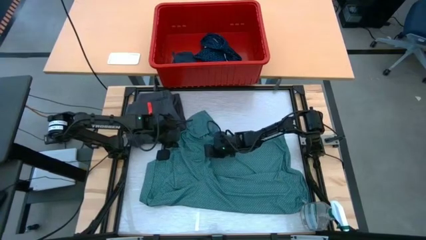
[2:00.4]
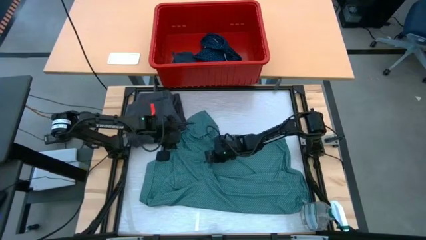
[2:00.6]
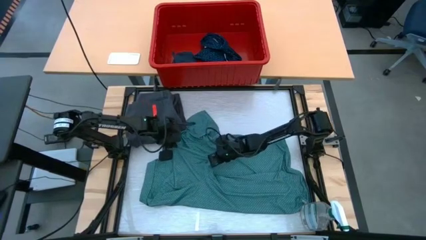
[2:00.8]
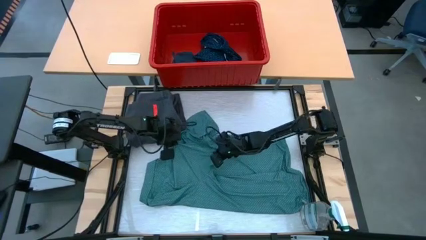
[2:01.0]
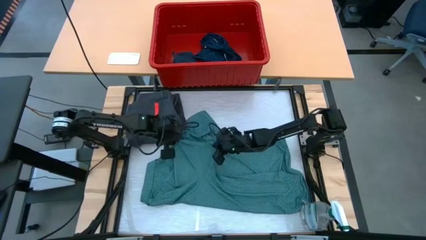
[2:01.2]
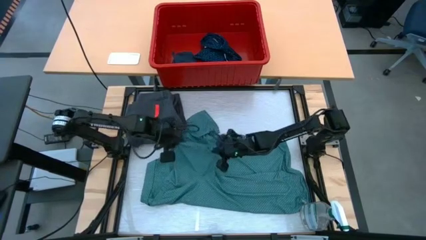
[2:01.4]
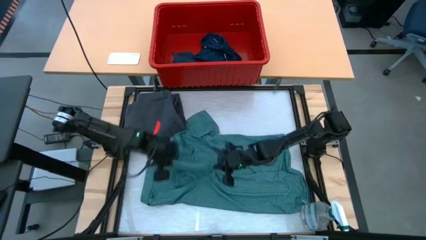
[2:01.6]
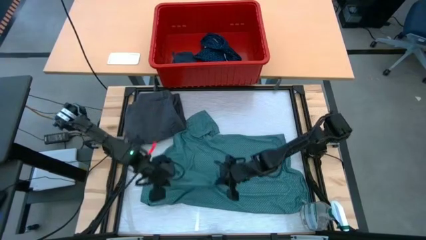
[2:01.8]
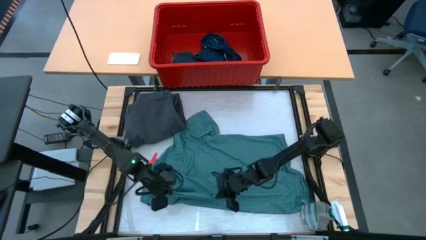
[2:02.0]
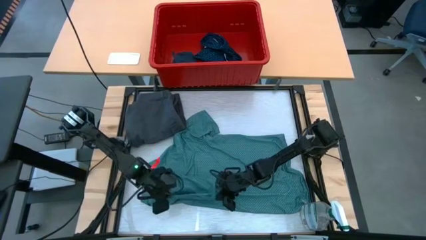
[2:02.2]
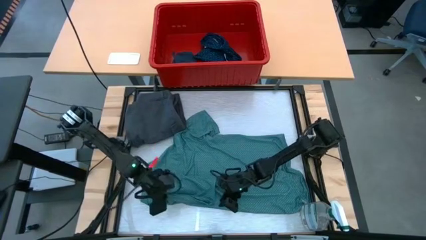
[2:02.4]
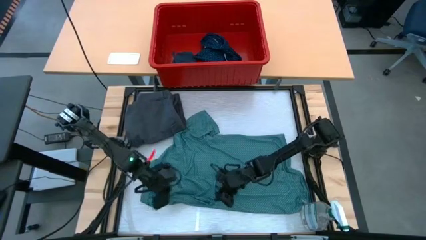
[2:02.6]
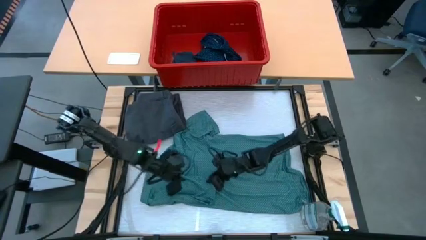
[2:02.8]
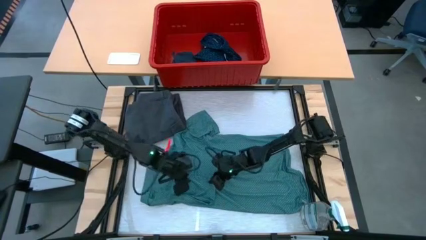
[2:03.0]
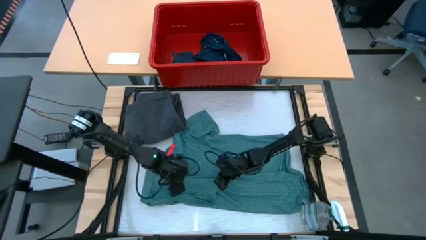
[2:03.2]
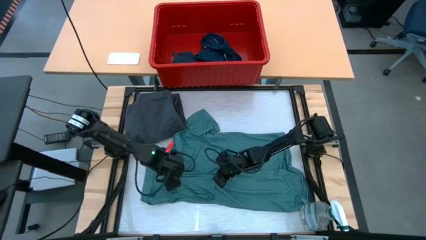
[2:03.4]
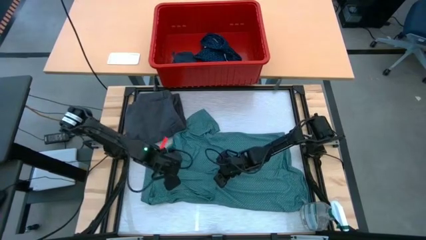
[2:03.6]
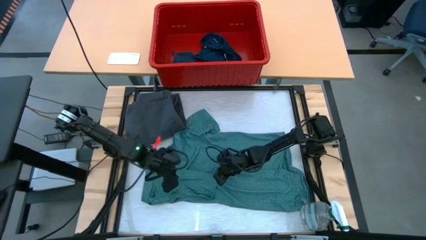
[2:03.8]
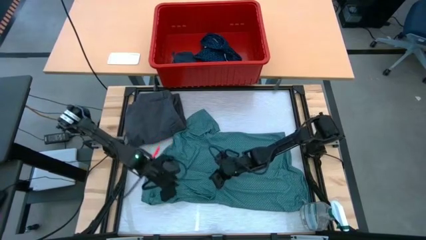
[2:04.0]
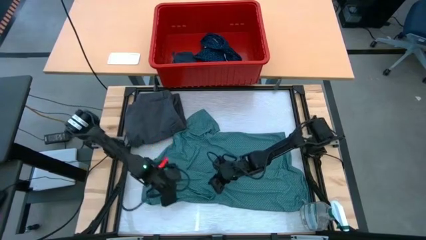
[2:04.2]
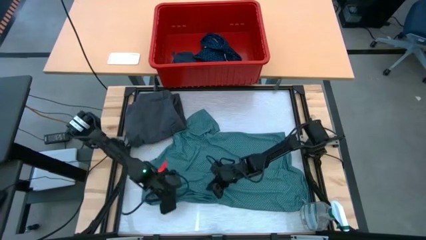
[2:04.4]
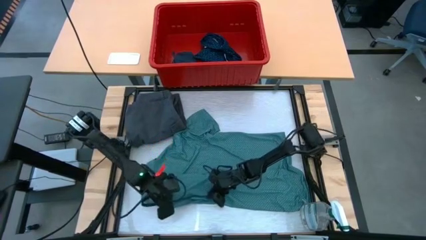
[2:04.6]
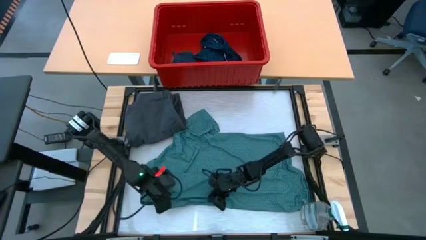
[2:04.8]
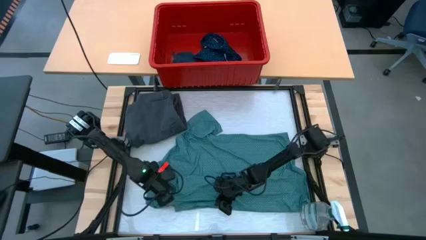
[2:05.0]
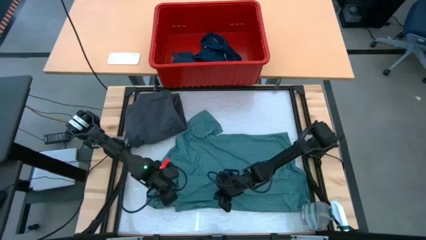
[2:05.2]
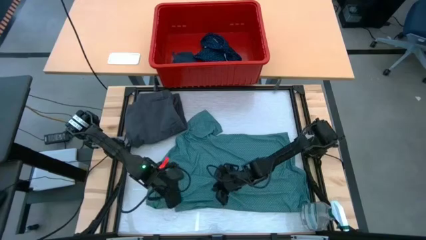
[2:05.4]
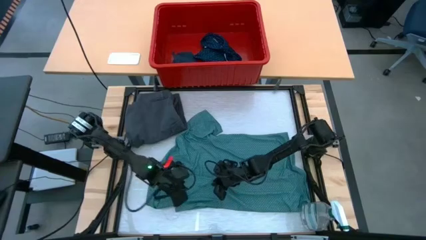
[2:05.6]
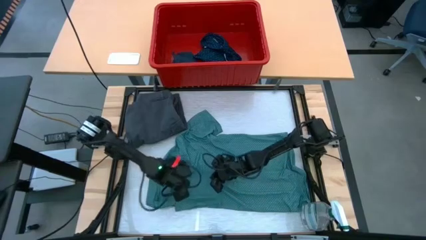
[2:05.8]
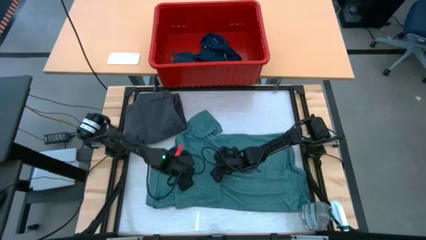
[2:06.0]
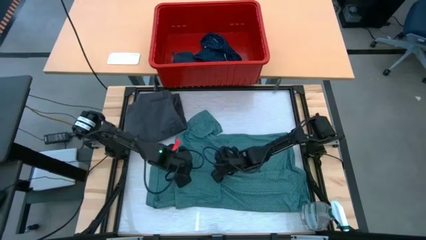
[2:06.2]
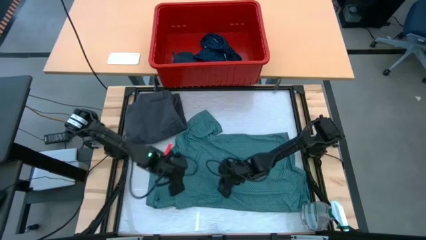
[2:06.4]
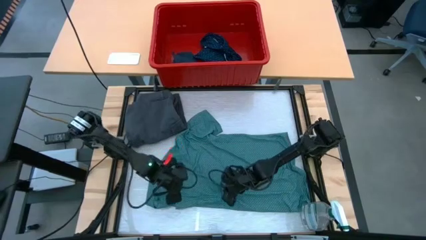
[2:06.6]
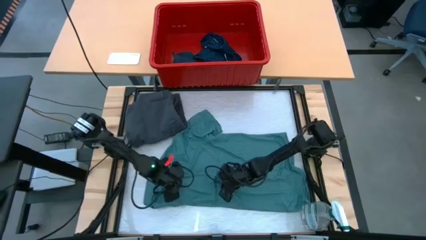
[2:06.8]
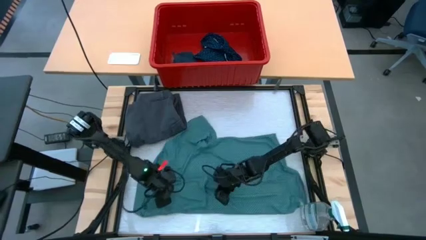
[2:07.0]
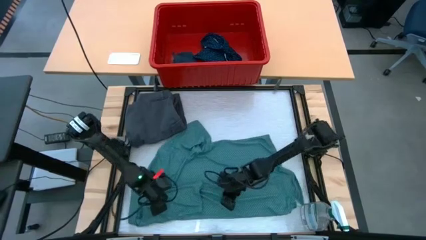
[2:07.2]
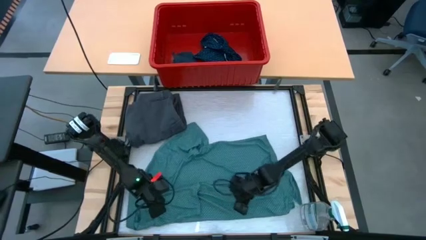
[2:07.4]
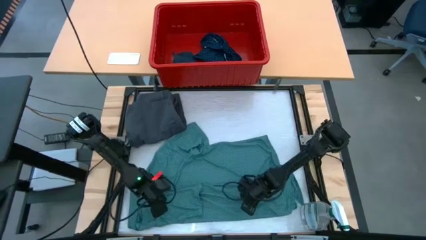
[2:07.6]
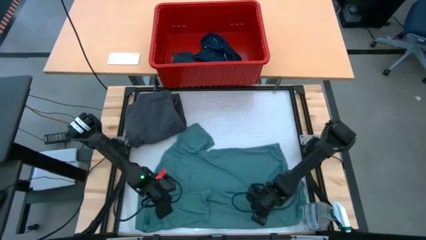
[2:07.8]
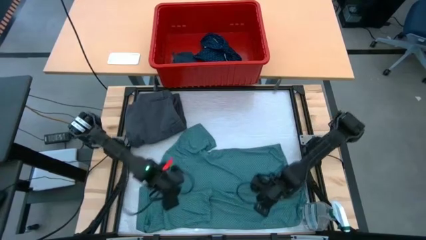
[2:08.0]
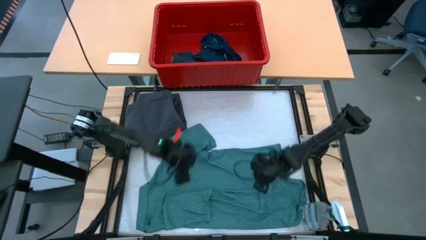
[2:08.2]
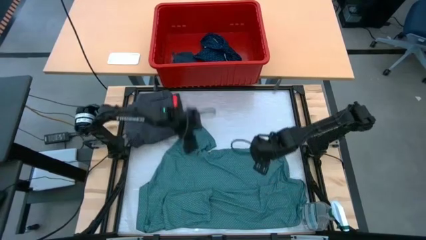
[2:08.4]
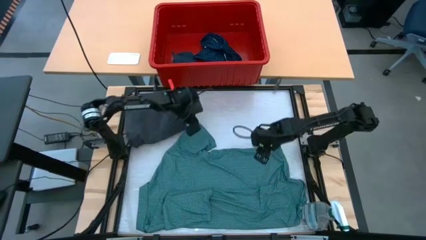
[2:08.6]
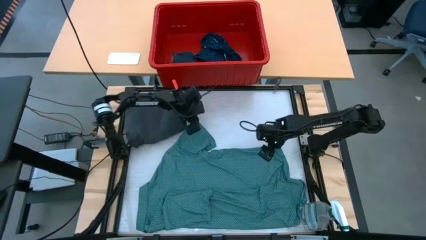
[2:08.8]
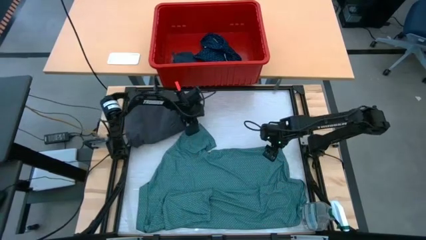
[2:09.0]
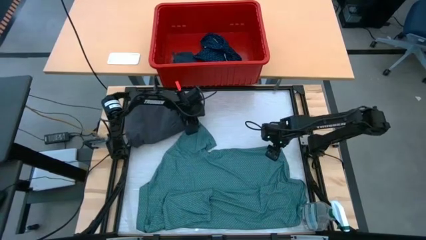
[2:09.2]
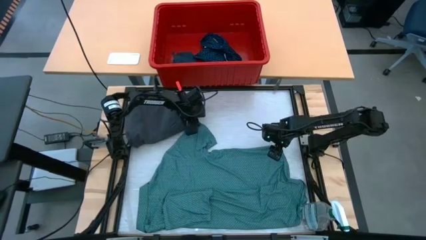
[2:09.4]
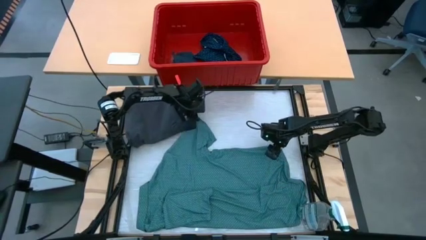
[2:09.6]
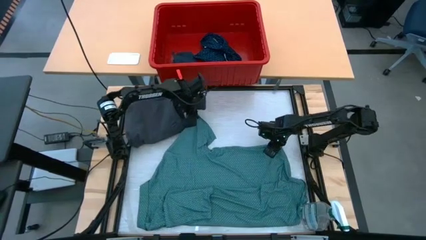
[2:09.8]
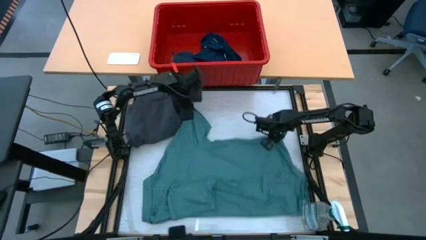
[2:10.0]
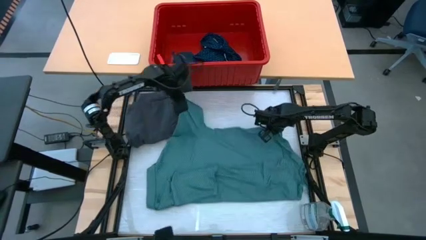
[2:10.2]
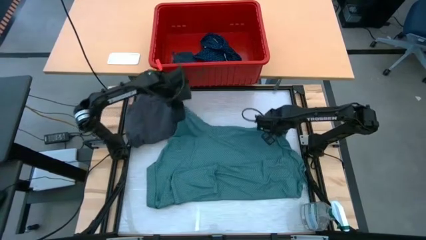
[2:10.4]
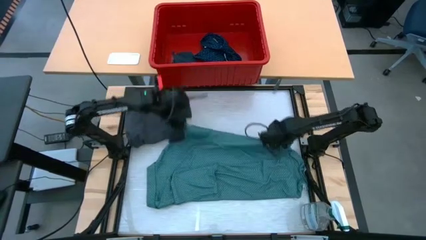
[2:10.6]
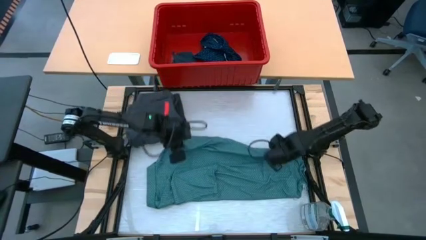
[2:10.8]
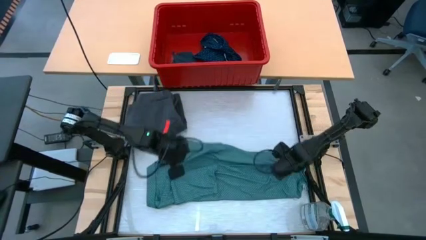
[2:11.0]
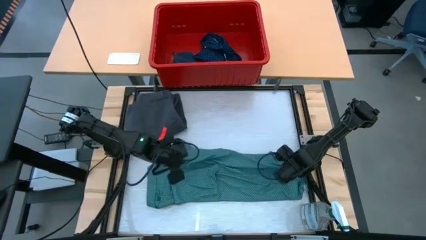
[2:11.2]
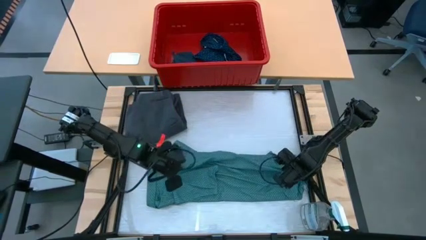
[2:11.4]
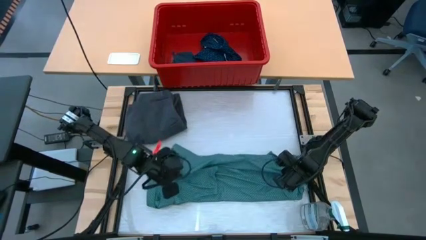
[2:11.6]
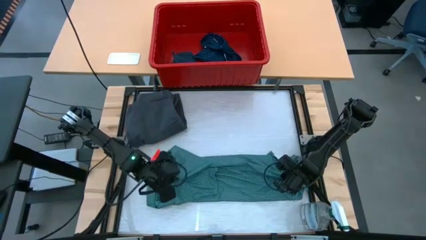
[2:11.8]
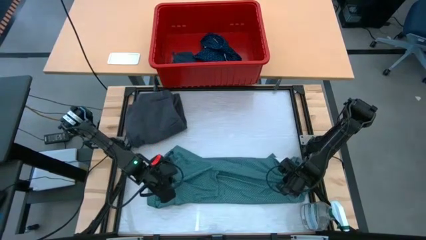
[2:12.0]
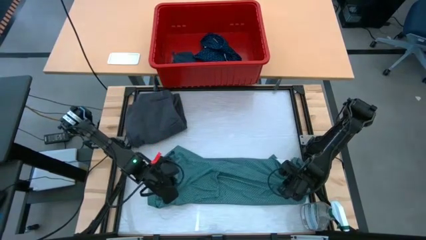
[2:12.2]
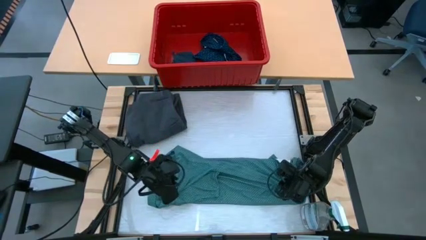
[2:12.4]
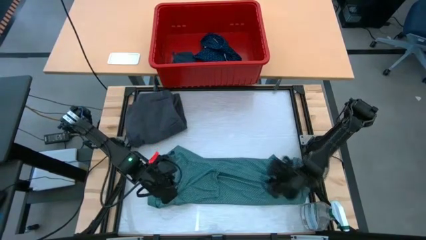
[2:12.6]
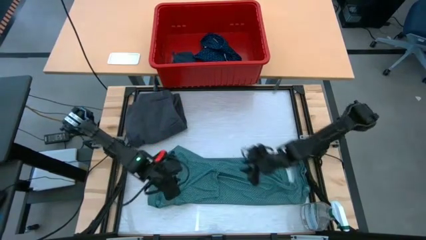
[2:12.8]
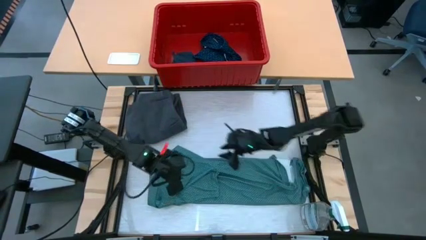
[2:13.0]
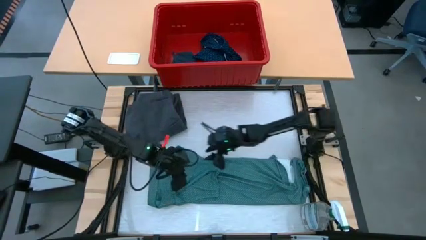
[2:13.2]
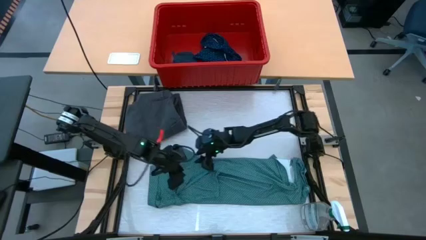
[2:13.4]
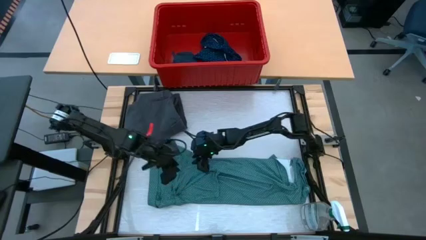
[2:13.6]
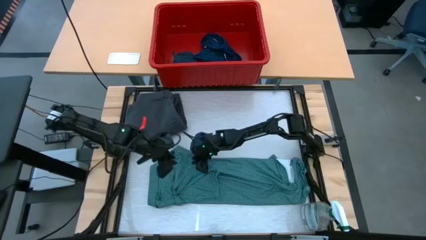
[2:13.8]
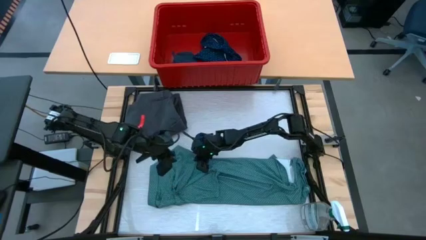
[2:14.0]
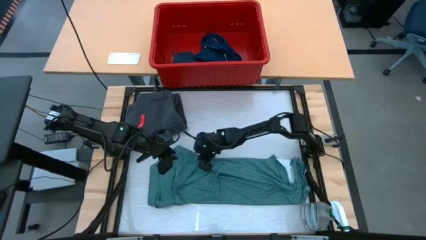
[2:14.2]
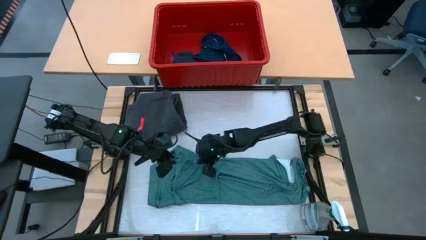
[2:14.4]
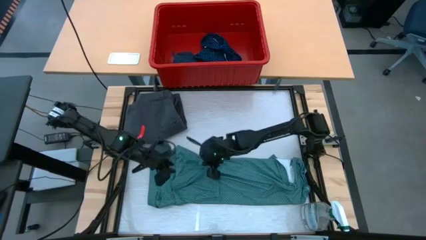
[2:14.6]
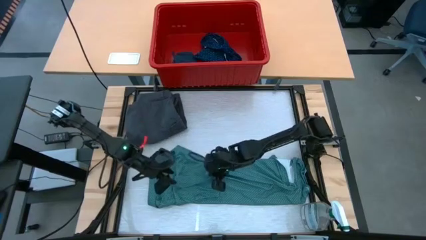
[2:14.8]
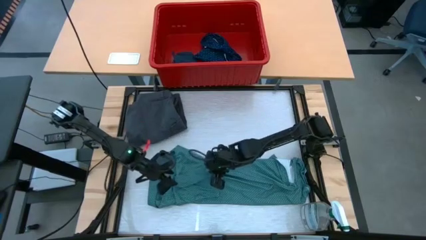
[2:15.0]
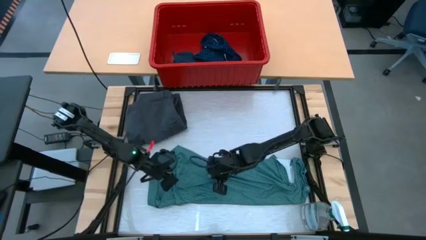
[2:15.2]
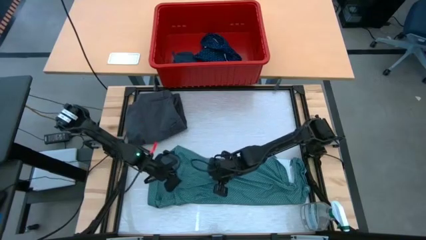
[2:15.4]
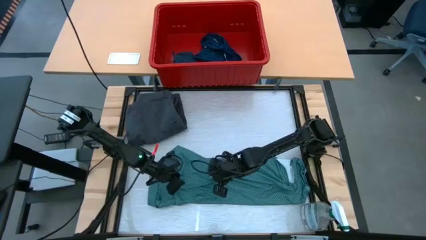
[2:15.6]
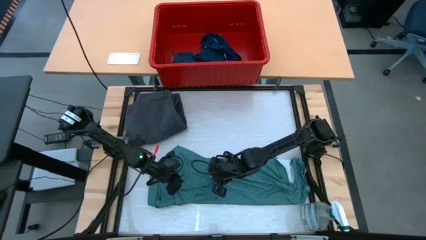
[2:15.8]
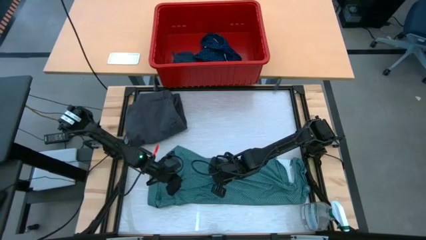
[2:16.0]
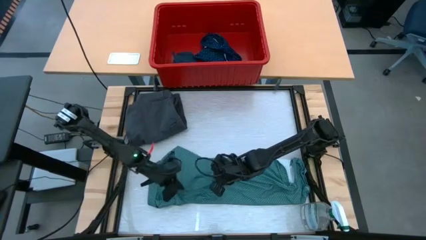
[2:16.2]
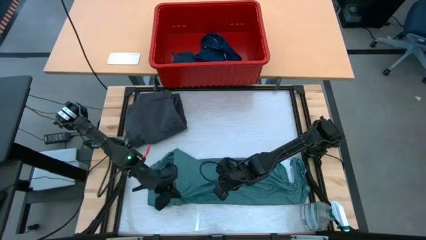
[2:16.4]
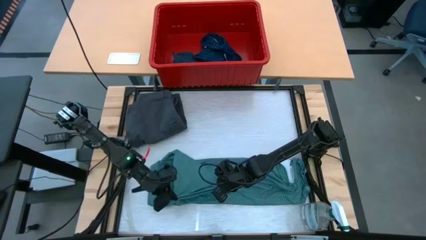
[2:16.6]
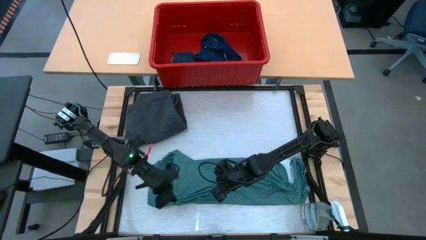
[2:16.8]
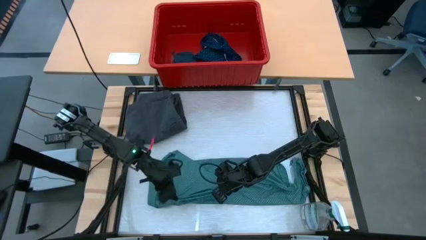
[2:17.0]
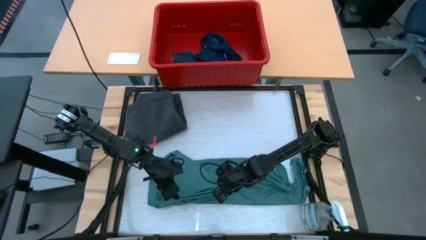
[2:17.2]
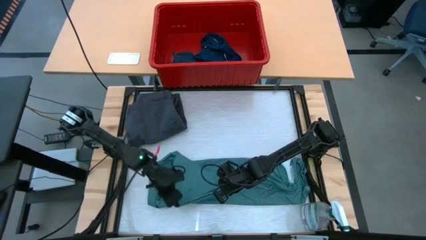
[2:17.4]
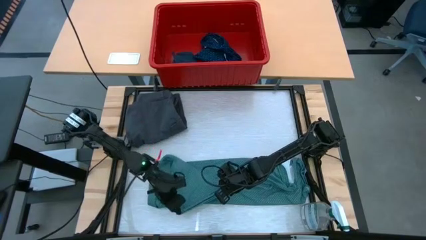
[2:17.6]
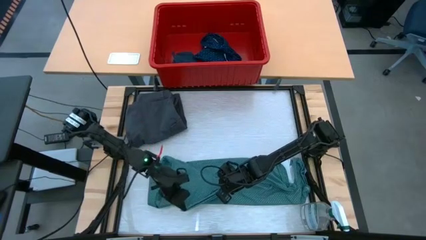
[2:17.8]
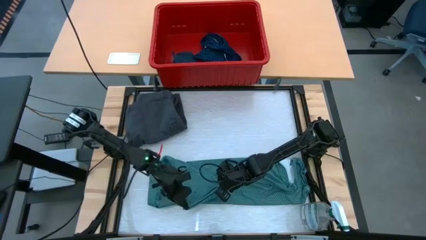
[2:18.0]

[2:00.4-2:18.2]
Task: Fold laundry
Fold the dark green polo
